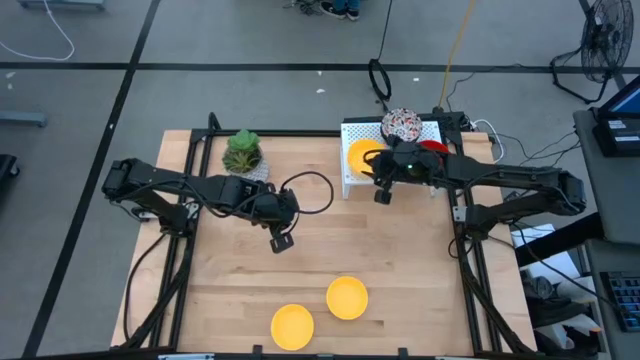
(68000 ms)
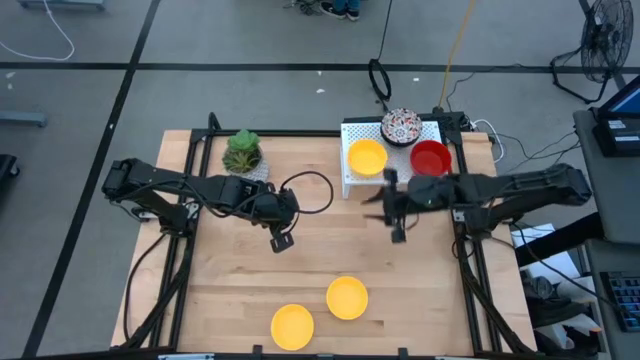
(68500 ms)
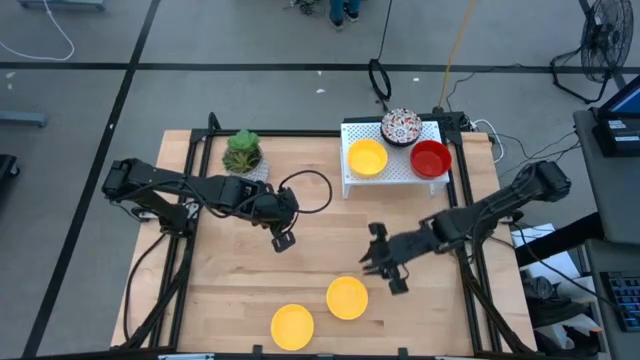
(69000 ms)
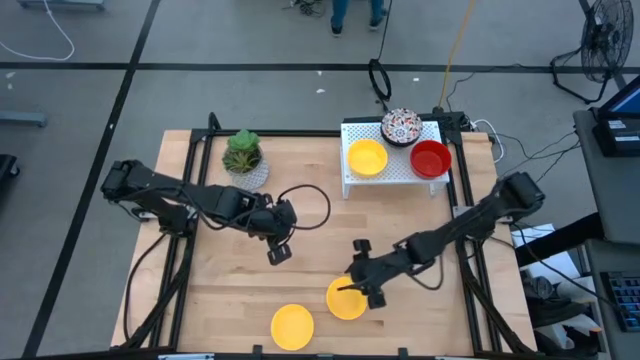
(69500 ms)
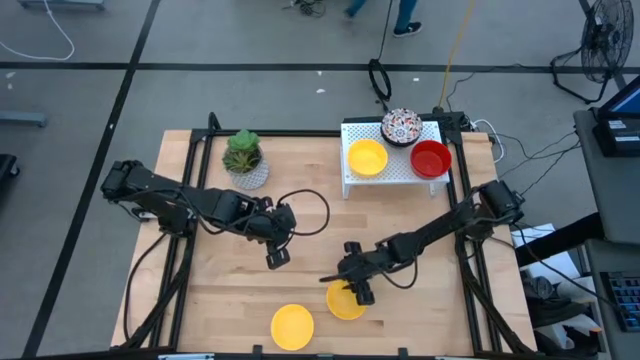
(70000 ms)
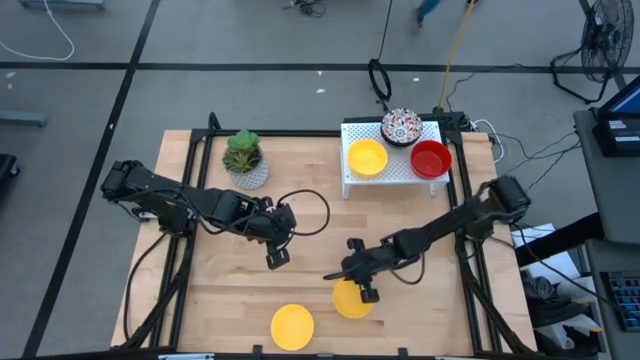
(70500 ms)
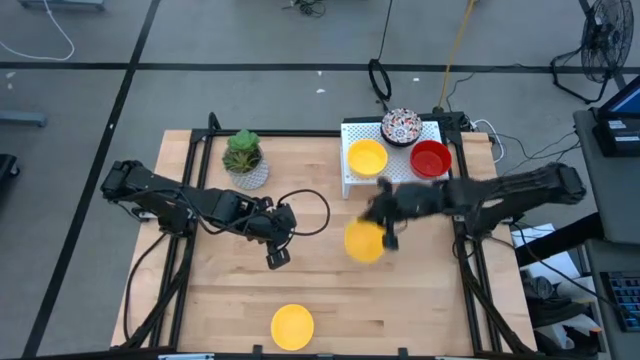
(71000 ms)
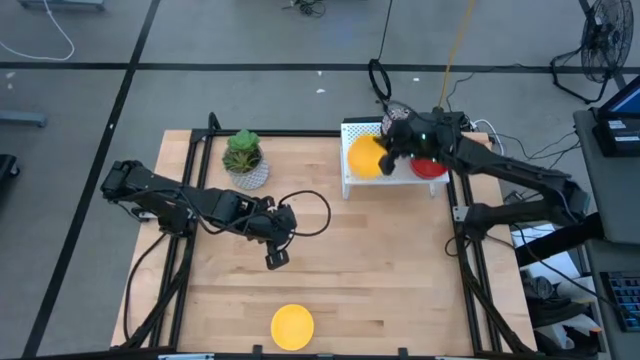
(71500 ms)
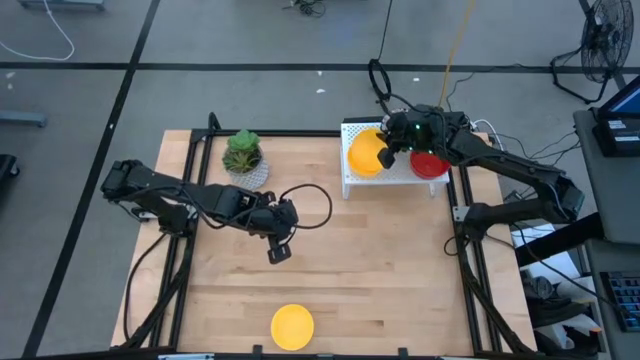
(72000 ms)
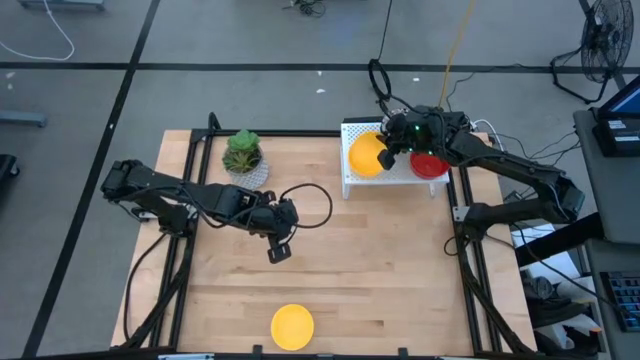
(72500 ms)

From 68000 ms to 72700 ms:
Task: Pick & Place Mini bowls
Stack the yellow bowl on top of the yellow bowl on the shelf

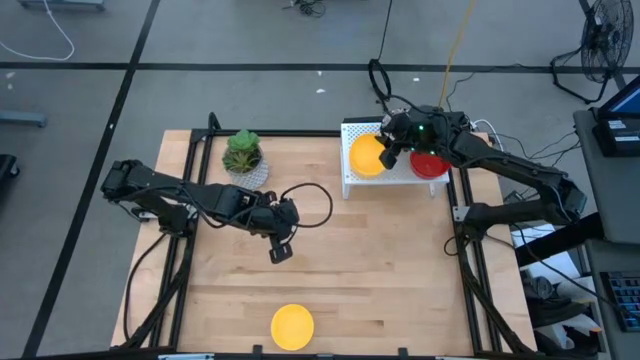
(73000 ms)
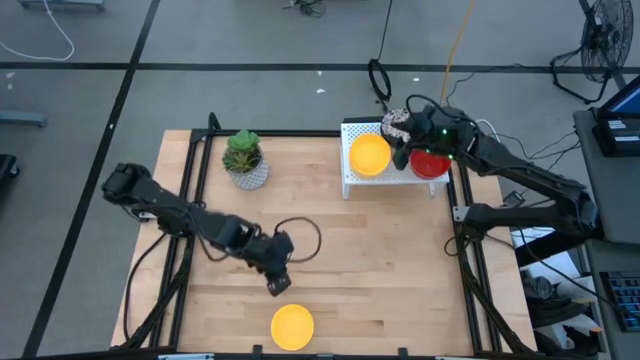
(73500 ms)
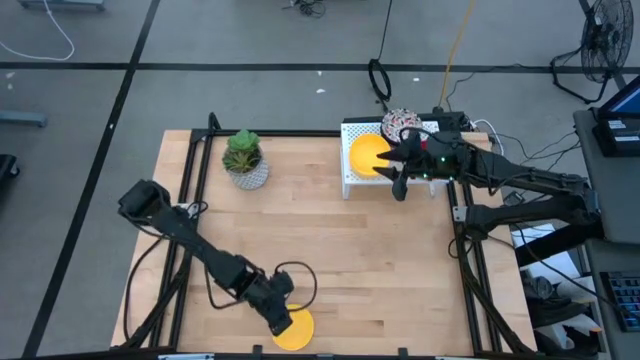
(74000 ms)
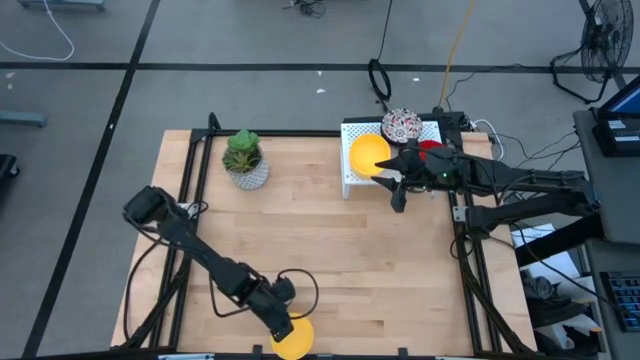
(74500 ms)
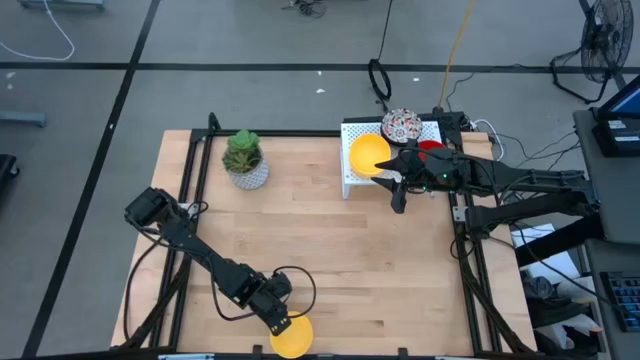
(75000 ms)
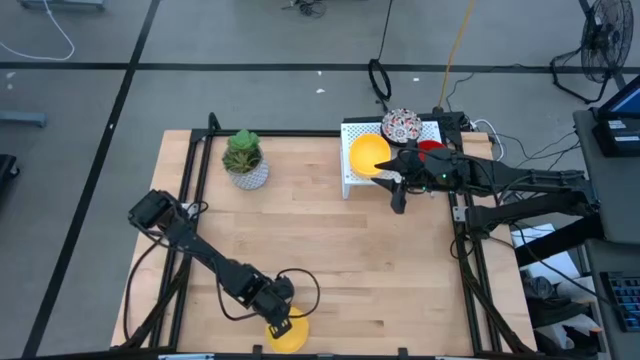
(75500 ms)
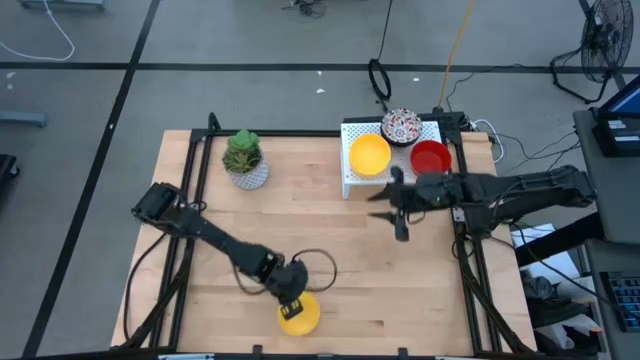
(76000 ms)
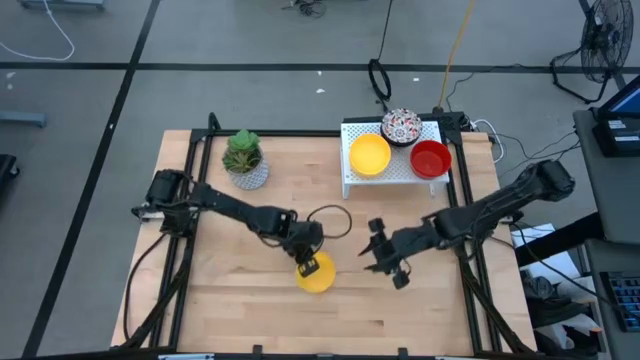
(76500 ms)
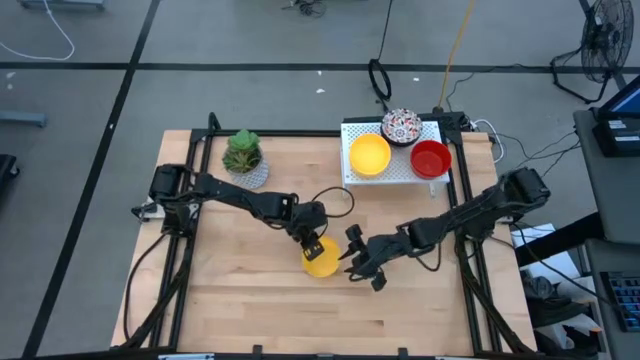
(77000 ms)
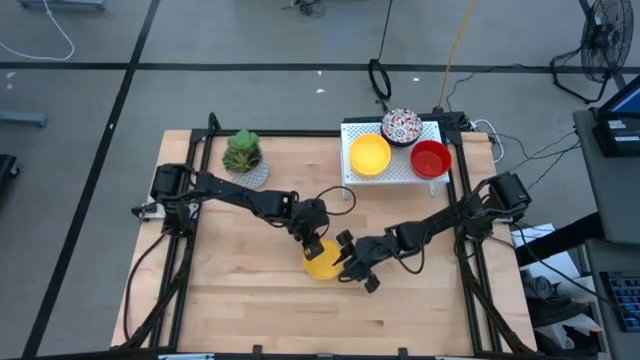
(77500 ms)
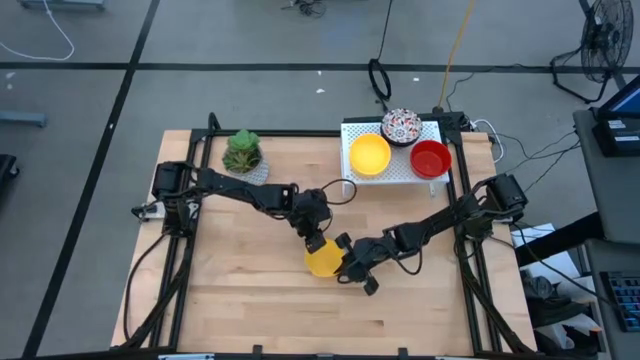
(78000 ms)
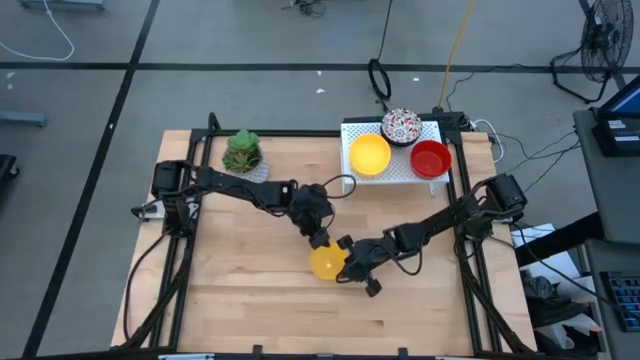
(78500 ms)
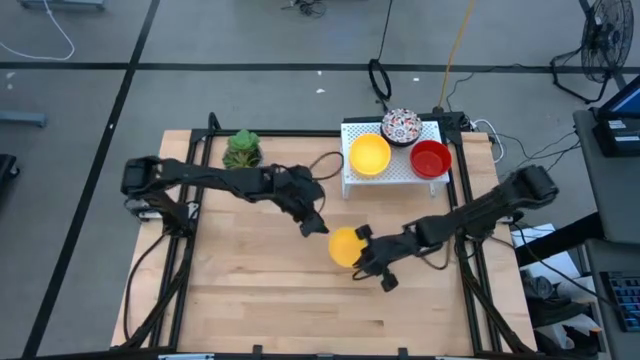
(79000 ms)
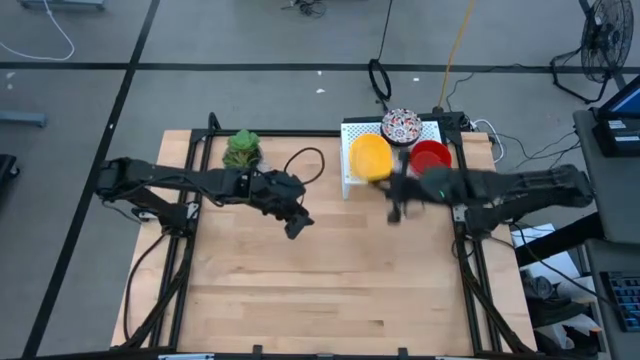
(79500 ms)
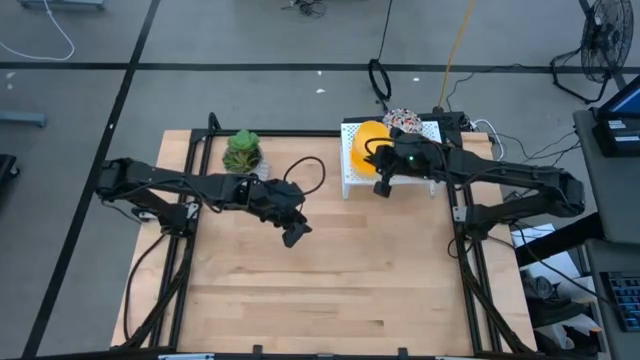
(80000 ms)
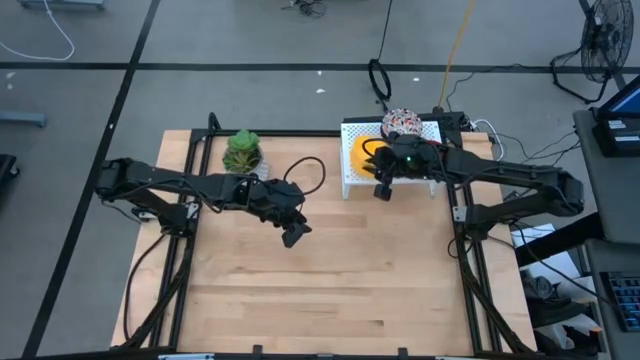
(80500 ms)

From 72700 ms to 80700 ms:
Stack the yellow bowl on top of the yellow bowl on the shelf

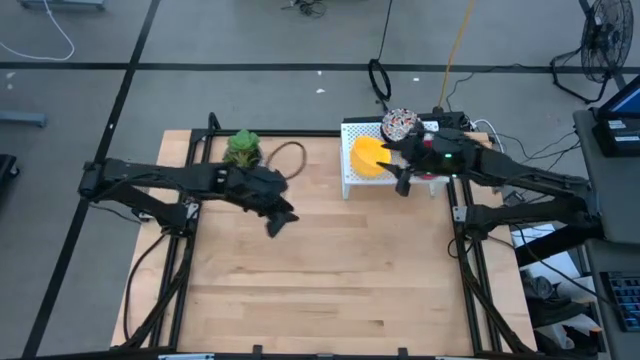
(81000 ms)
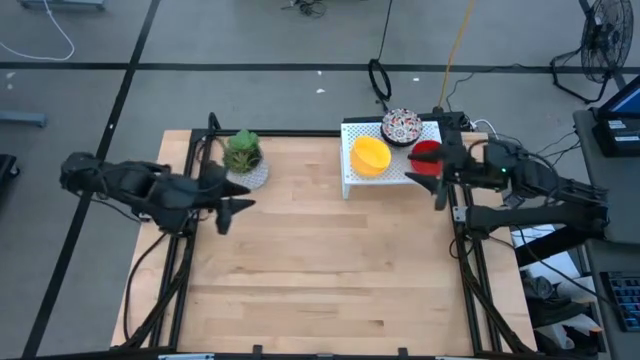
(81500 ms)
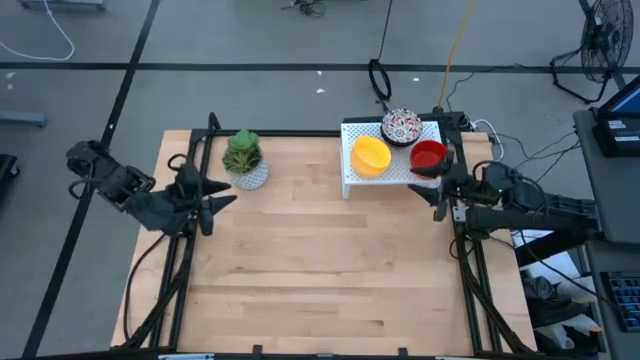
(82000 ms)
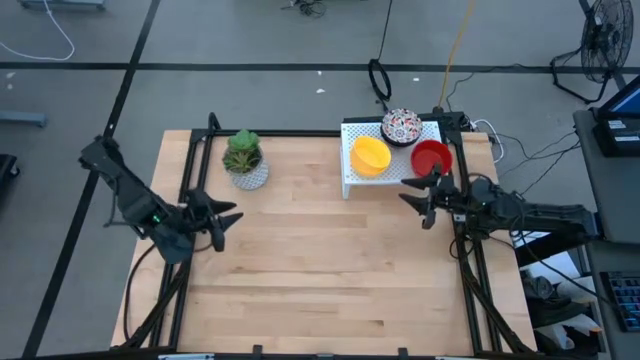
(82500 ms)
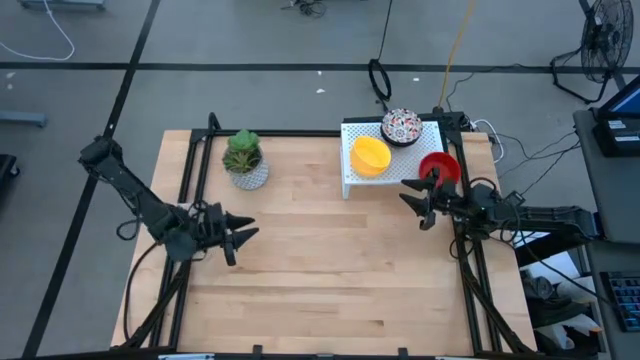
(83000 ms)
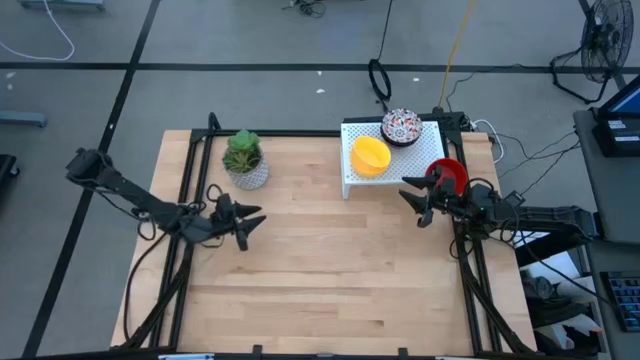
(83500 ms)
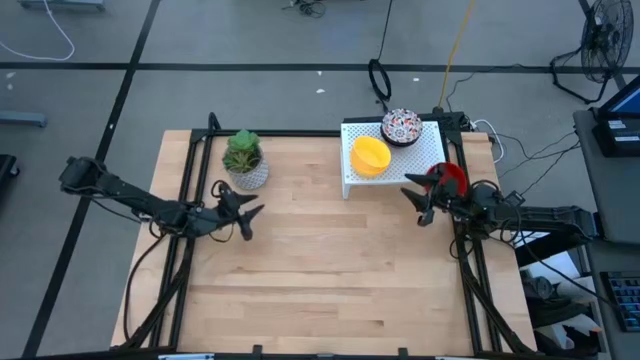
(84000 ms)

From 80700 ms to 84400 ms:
Put the red bowls on the shelf

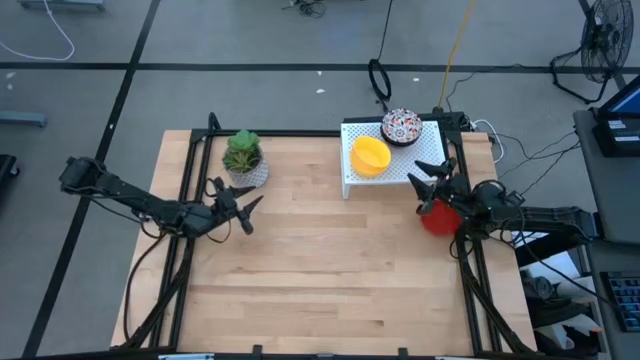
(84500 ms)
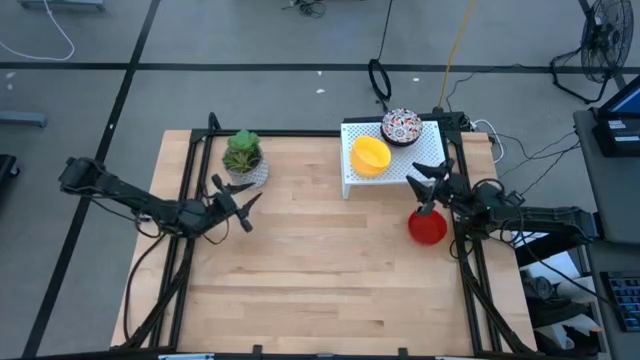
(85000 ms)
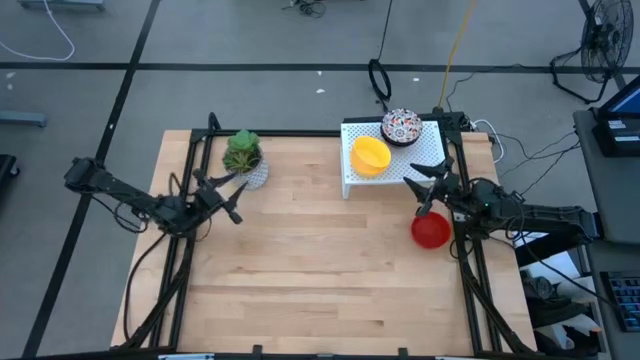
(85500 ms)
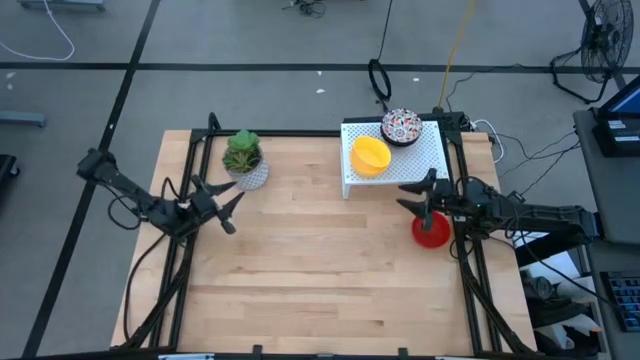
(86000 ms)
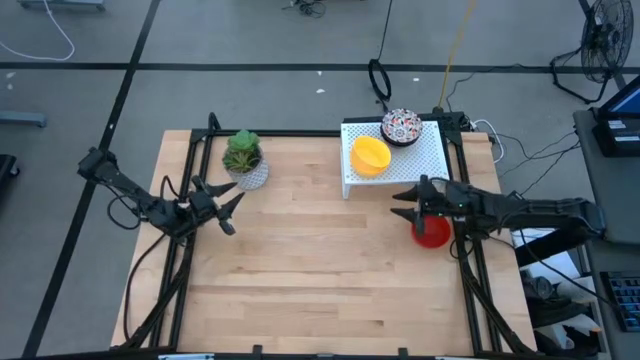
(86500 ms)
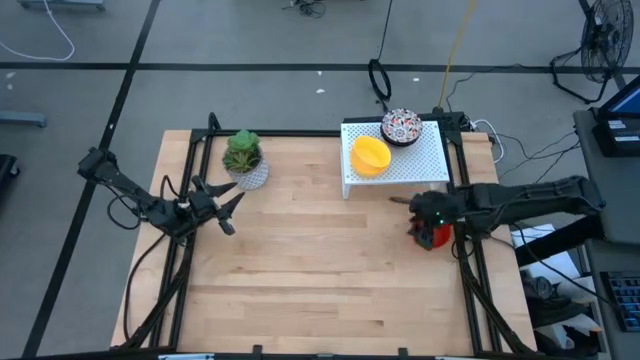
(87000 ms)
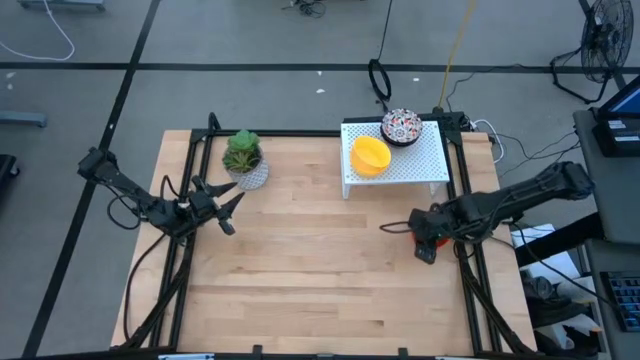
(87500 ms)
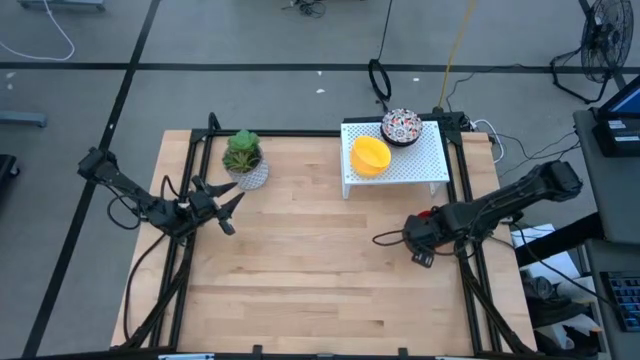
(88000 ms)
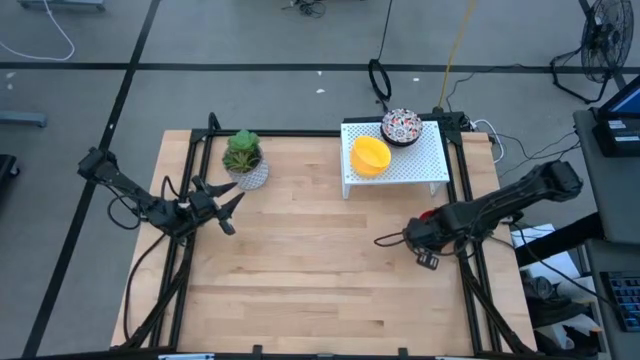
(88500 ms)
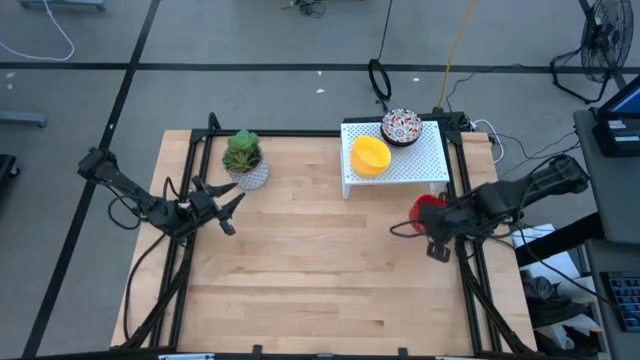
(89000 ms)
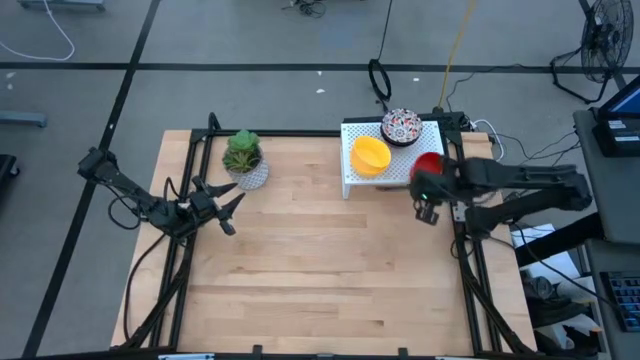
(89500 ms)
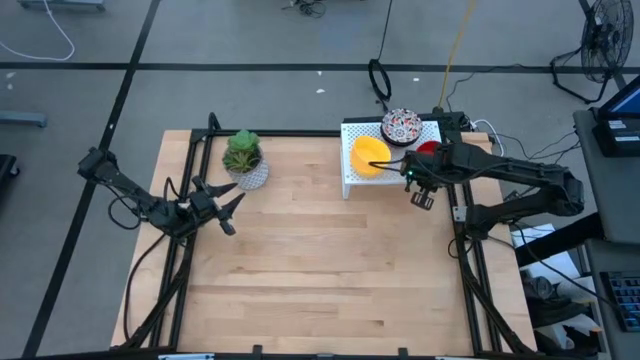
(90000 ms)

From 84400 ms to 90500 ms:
Put the red bowls on the shelf
